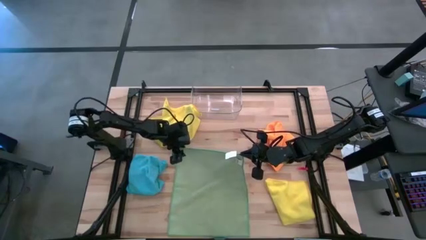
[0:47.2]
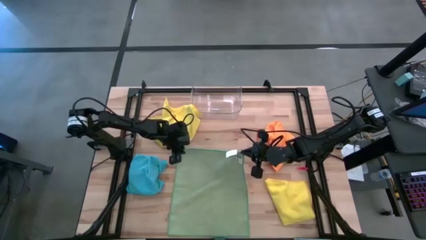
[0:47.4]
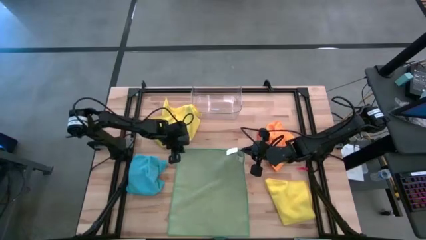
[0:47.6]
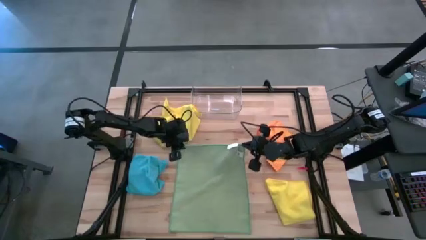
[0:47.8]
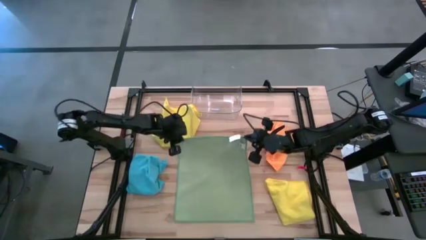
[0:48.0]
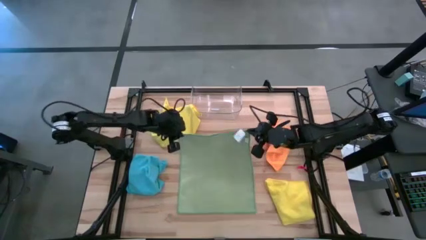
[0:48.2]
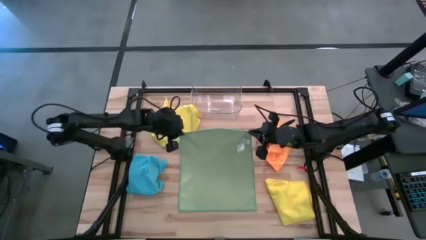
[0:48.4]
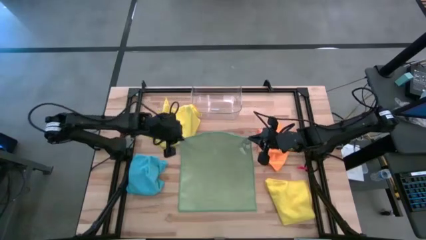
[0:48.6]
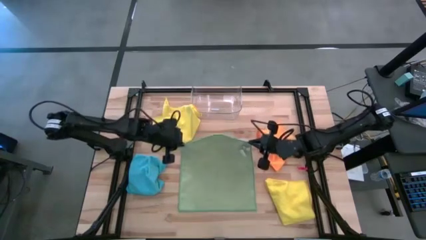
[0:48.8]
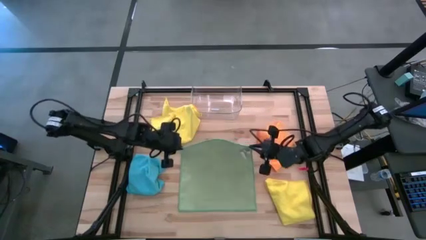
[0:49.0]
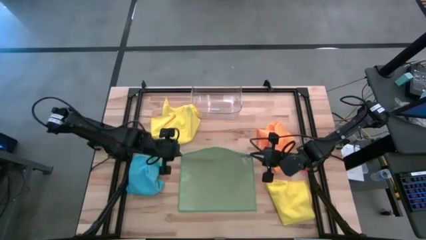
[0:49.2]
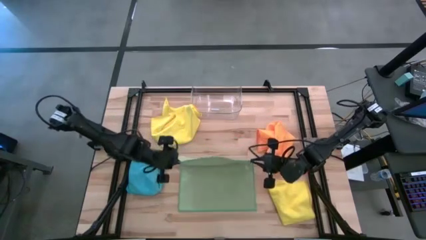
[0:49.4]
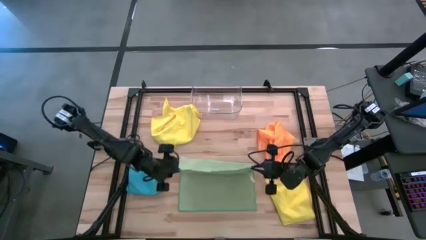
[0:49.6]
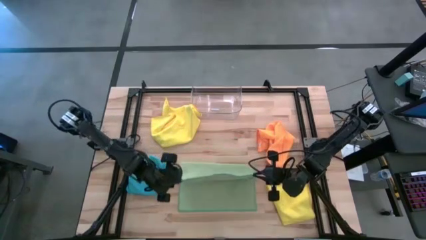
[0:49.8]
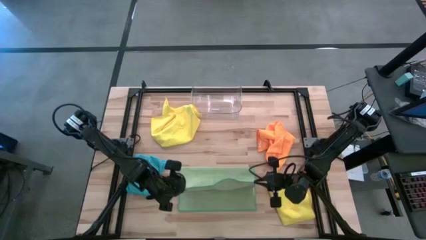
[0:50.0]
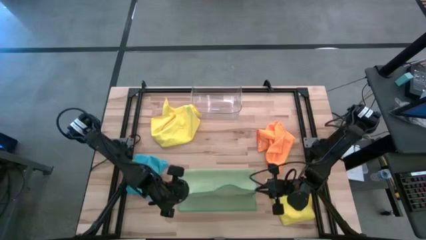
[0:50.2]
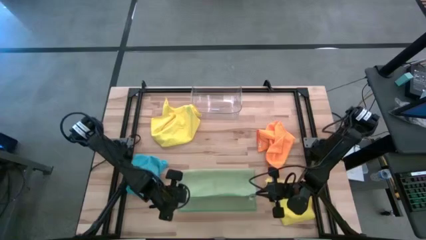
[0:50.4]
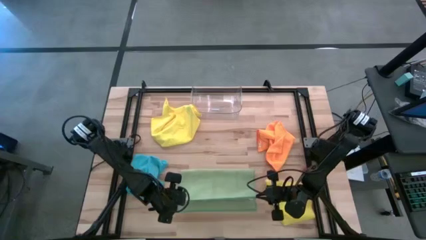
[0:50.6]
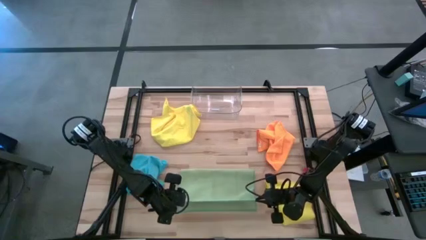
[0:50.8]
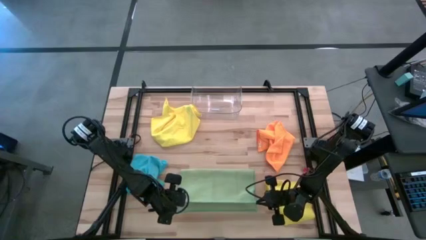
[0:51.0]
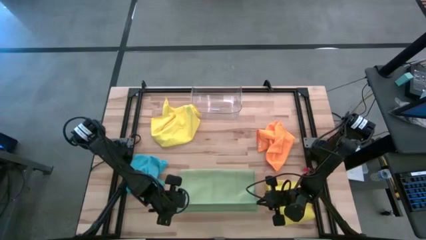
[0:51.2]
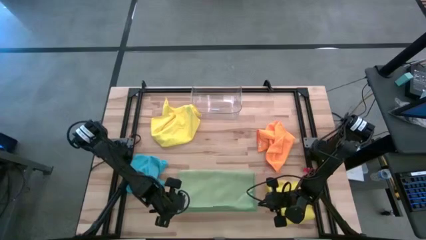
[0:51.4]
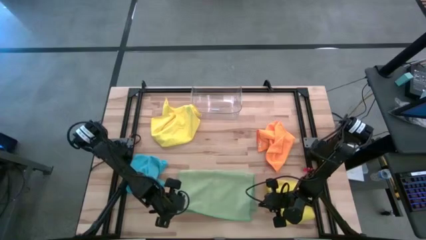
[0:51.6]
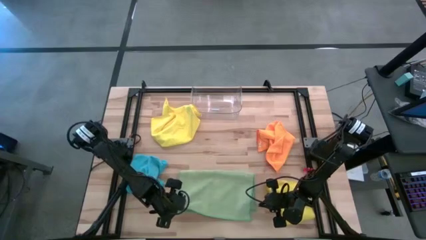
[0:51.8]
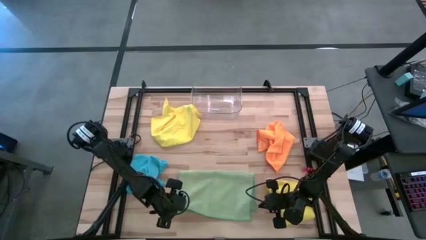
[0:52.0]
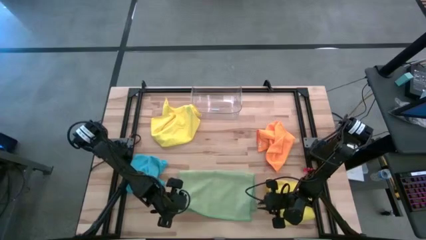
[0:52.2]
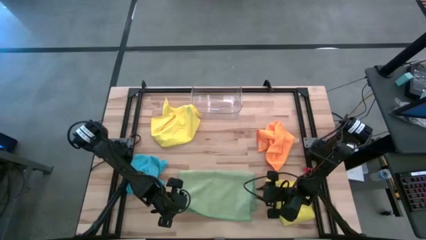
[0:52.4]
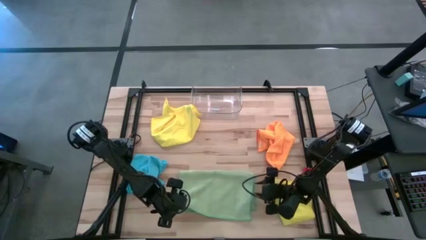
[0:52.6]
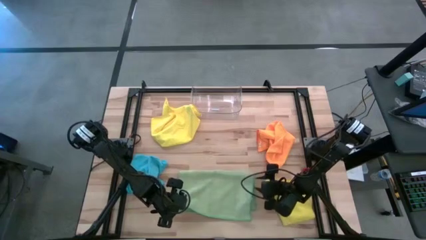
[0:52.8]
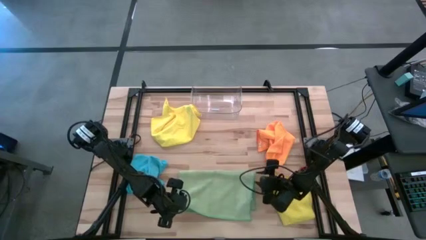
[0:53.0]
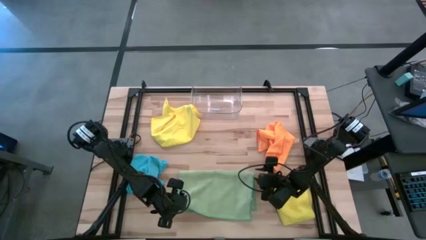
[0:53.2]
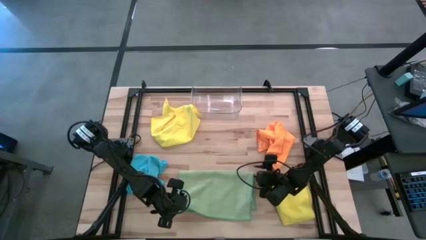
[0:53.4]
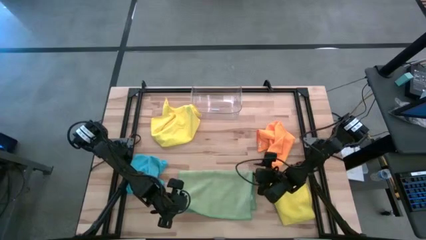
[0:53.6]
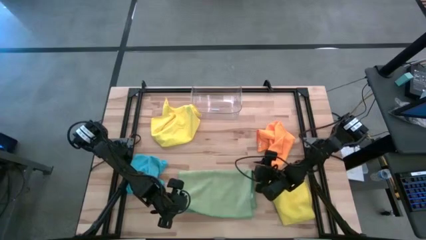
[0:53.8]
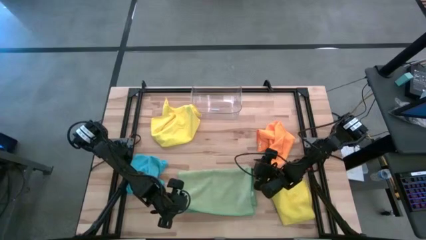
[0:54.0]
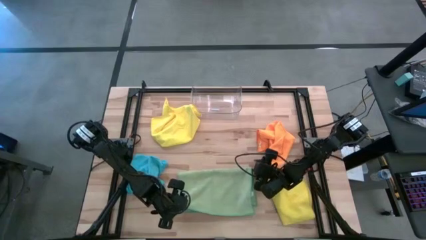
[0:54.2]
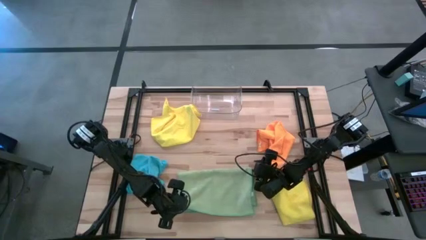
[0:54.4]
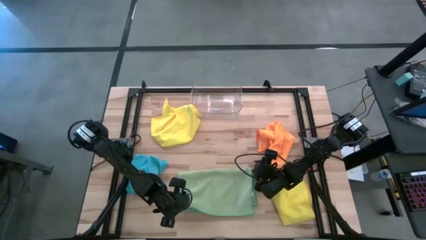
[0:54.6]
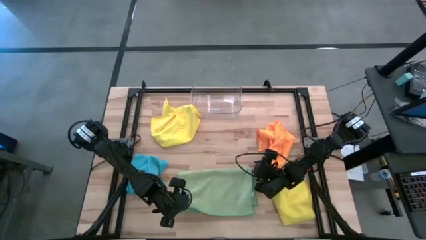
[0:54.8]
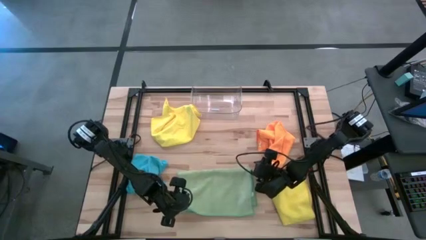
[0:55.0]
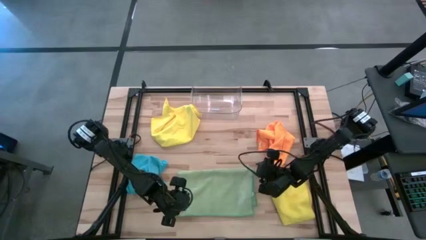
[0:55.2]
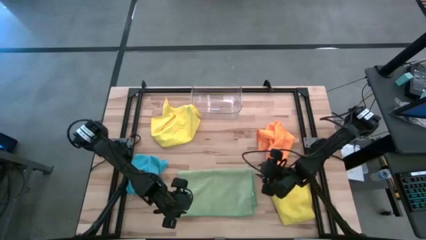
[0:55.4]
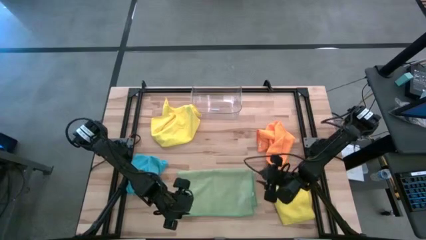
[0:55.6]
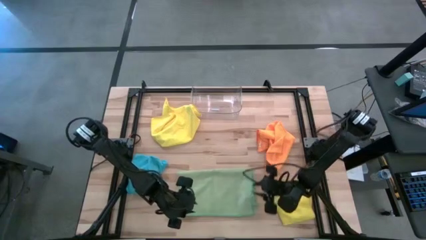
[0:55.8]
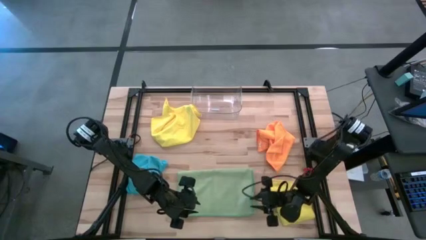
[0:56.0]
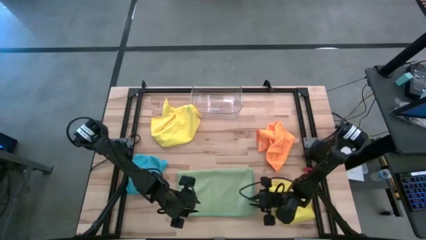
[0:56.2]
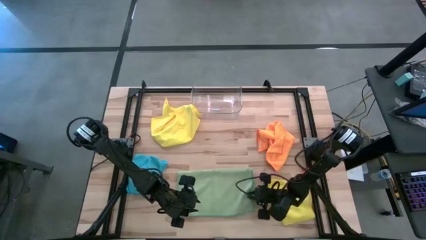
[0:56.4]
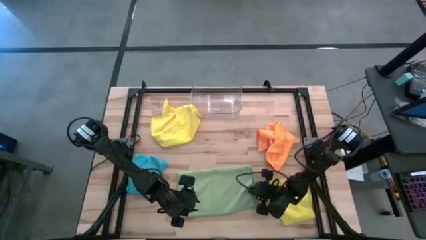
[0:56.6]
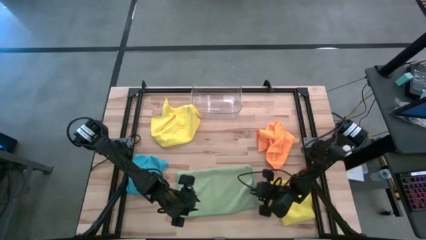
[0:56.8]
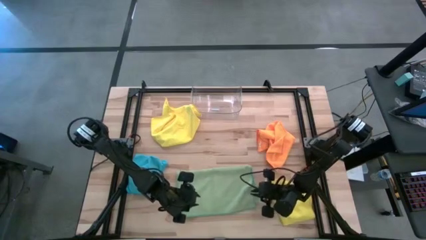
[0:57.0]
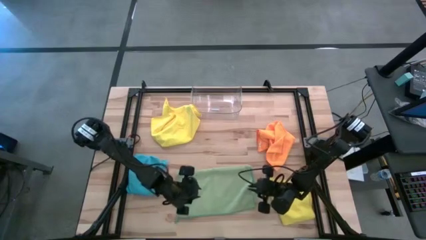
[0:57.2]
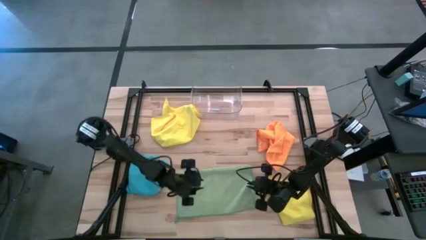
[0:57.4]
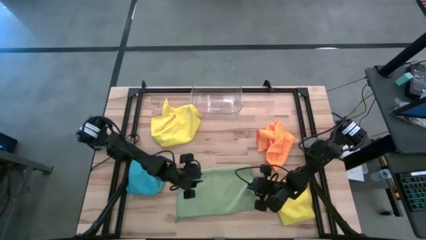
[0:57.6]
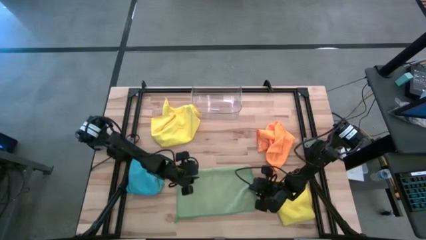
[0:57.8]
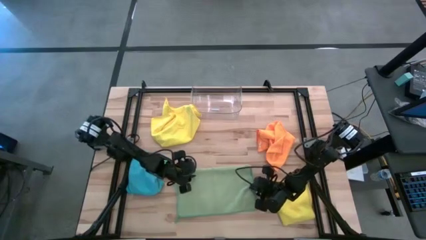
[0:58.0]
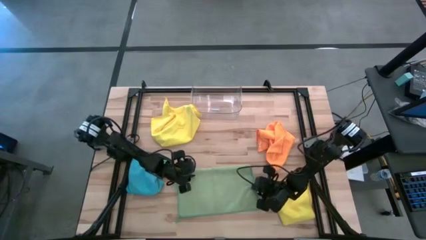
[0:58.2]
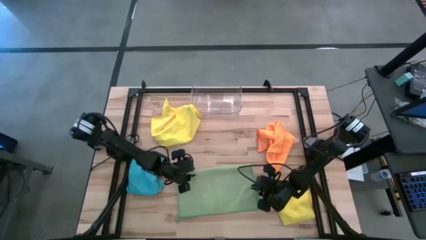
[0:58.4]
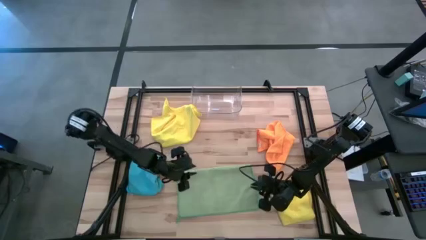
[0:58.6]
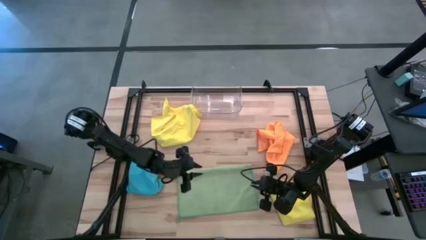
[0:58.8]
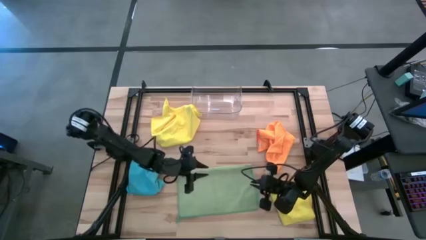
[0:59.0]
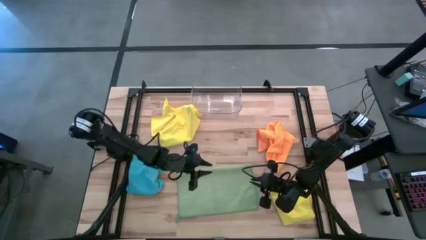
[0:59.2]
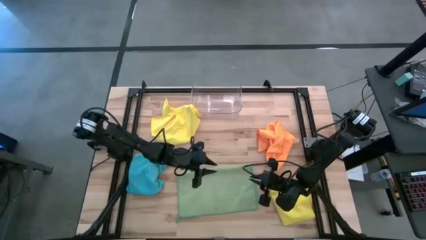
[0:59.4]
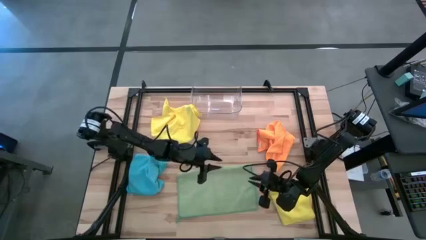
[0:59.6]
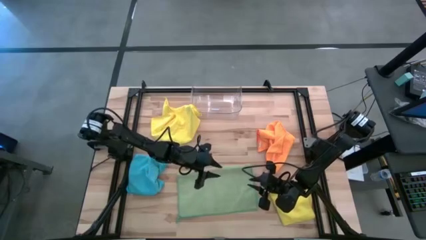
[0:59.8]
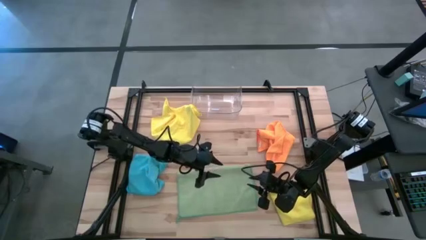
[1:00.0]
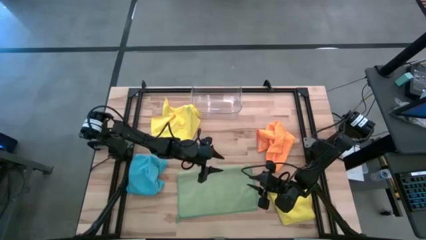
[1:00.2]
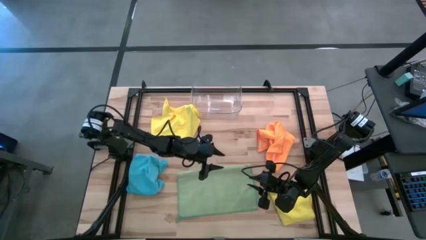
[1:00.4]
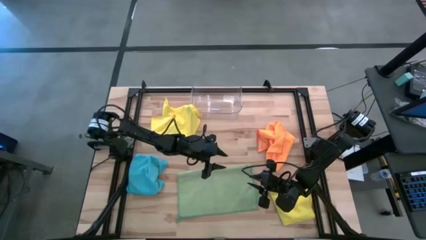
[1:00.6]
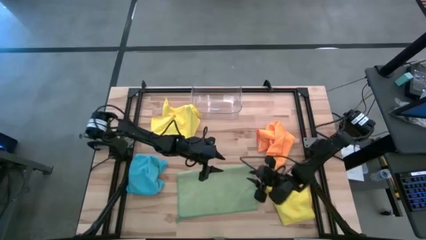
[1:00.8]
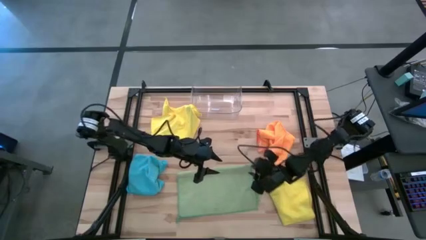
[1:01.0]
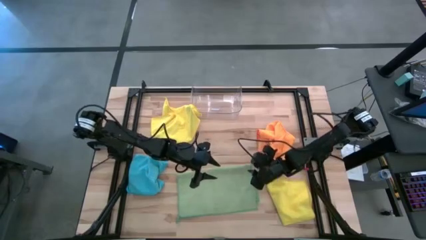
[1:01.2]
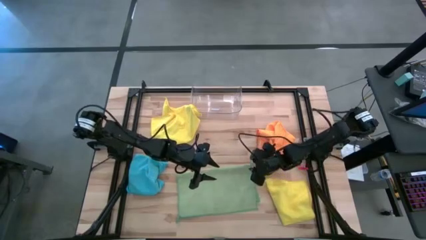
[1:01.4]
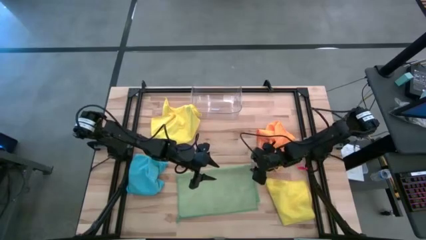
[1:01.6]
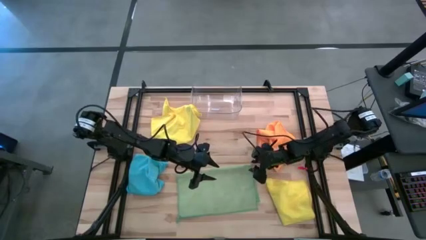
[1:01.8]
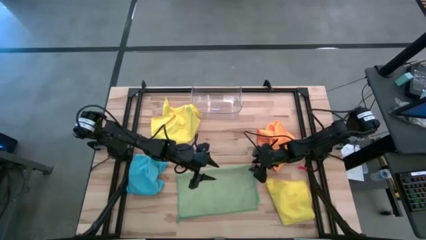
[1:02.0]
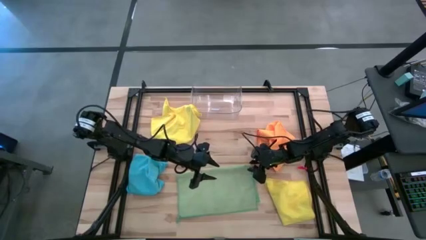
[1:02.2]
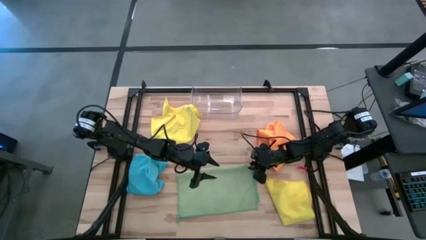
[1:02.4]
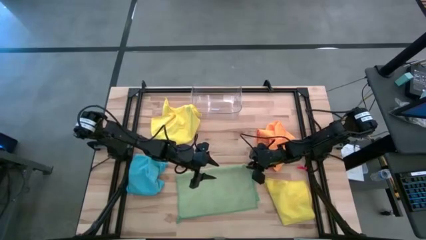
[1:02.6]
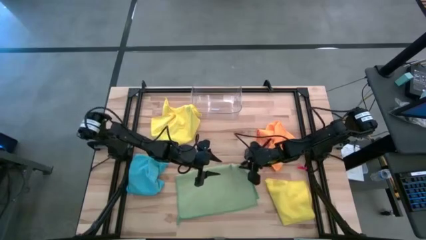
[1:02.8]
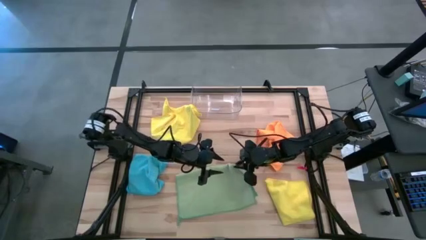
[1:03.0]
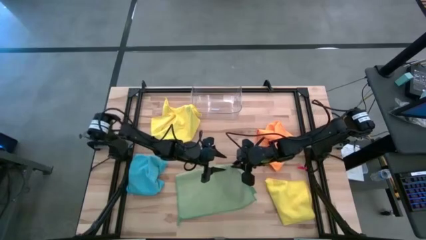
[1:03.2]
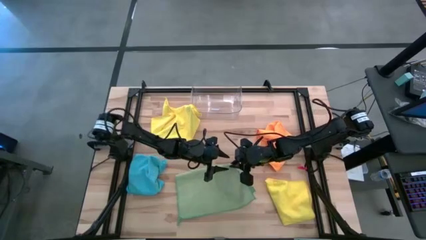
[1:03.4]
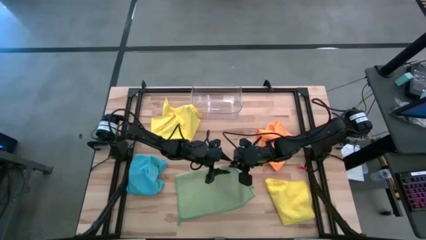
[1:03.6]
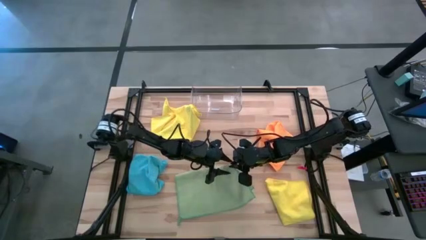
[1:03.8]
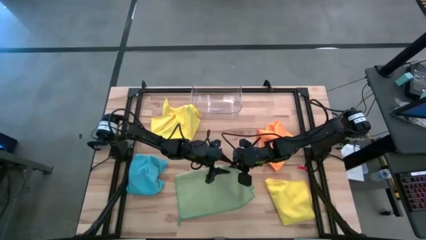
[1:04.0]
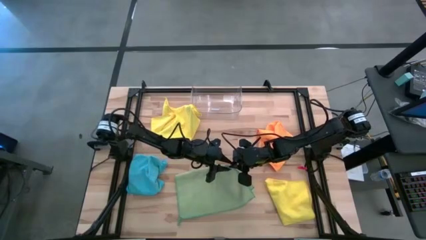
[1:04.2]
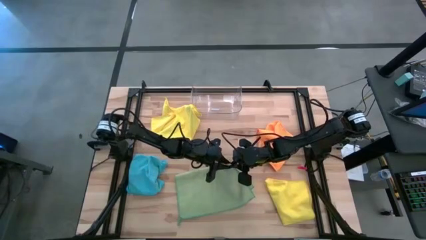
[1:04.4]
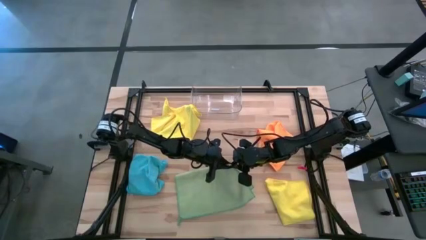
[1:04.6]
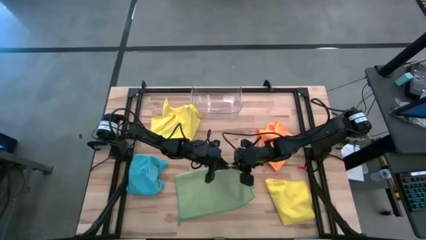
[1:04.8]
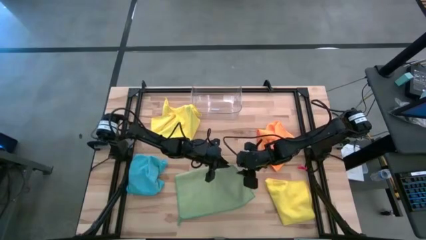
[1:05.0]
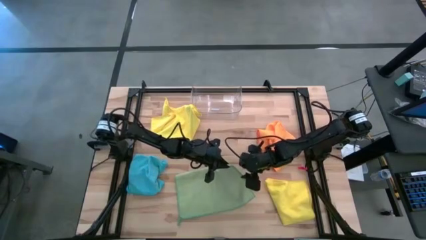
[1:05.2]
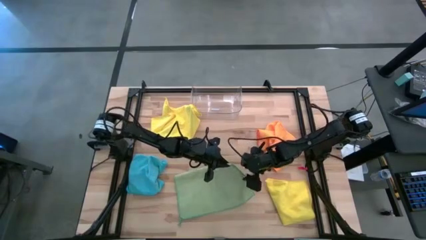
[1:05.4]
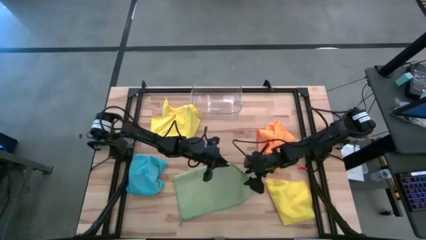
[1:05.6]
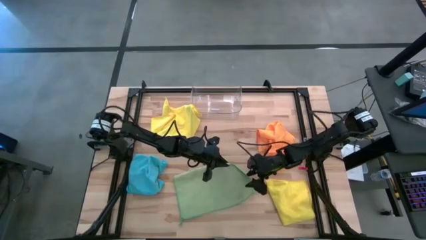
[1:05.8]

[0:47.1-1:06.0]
Task: Fold microfiber towels
Fold the light green microfiber cloth
